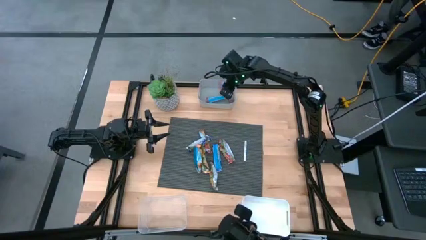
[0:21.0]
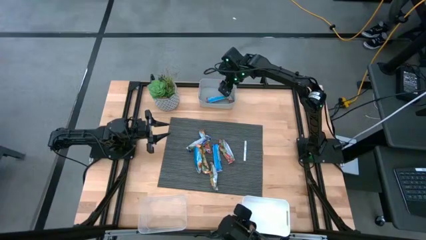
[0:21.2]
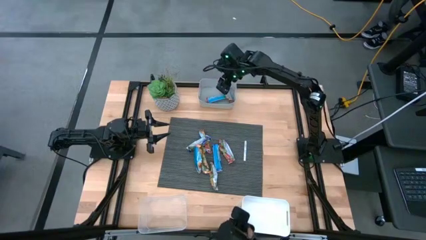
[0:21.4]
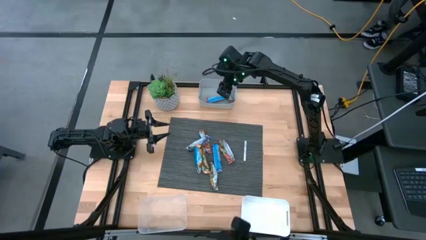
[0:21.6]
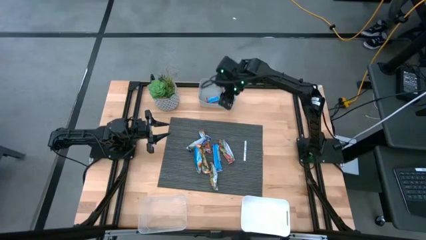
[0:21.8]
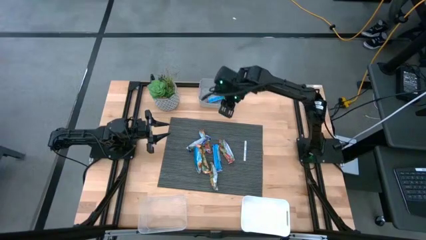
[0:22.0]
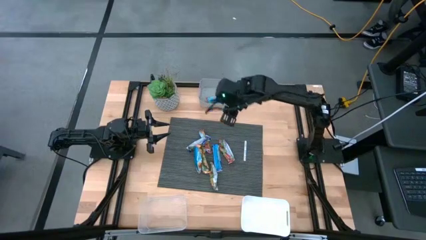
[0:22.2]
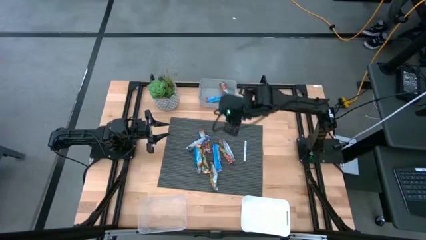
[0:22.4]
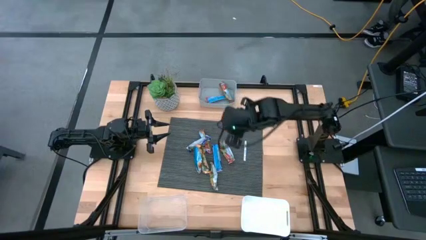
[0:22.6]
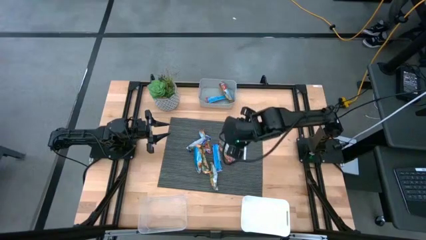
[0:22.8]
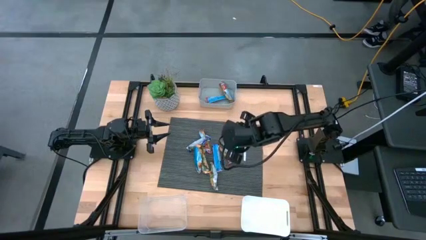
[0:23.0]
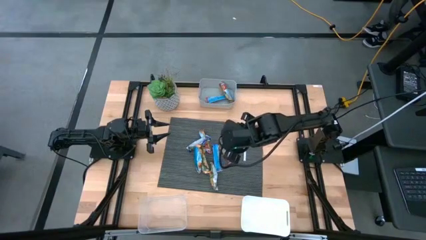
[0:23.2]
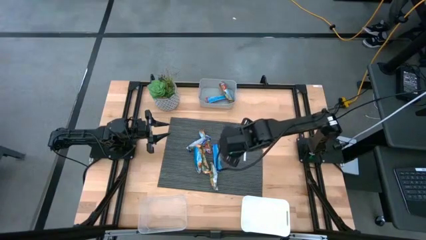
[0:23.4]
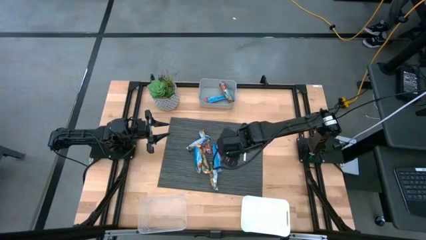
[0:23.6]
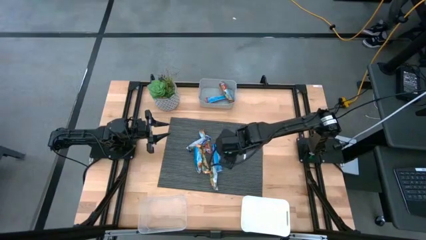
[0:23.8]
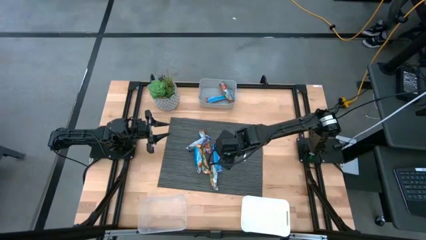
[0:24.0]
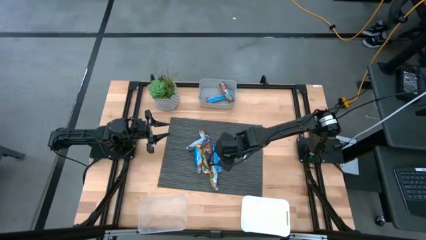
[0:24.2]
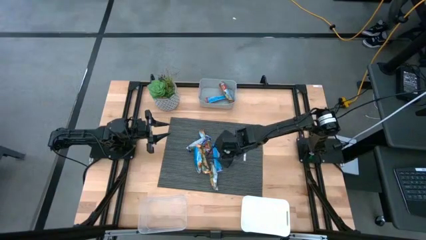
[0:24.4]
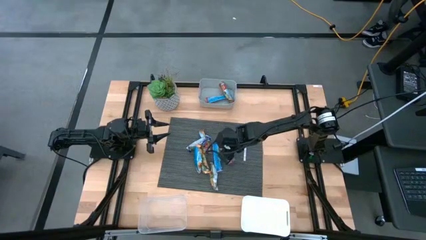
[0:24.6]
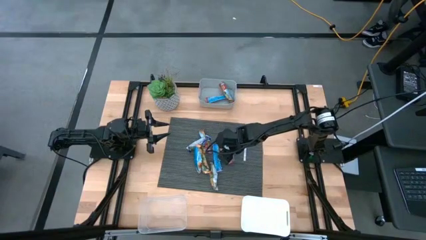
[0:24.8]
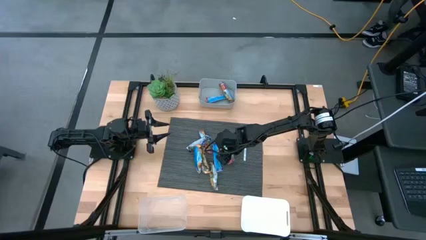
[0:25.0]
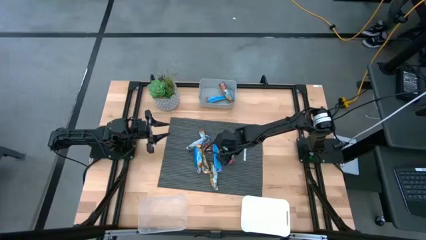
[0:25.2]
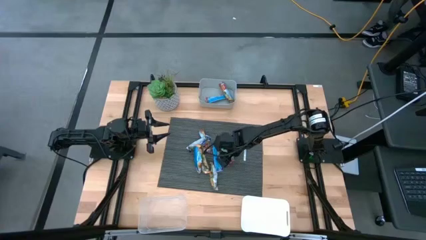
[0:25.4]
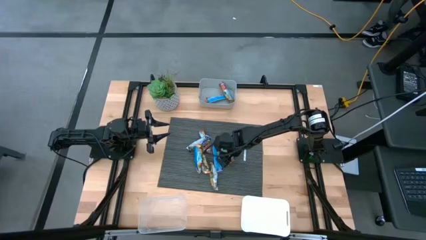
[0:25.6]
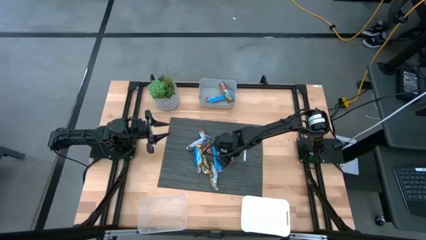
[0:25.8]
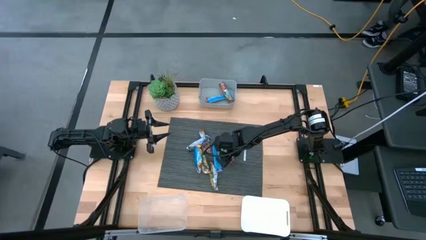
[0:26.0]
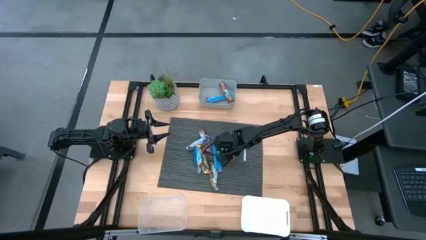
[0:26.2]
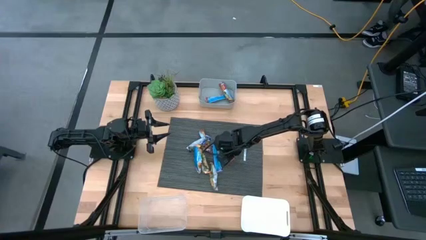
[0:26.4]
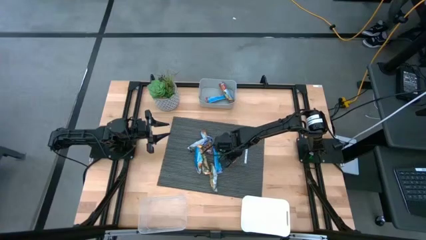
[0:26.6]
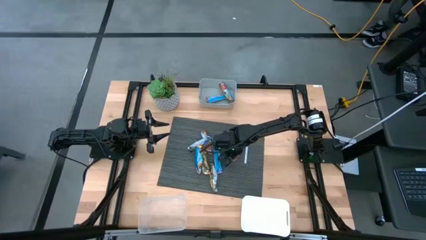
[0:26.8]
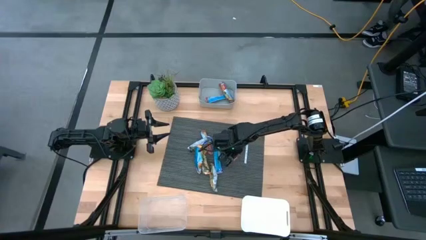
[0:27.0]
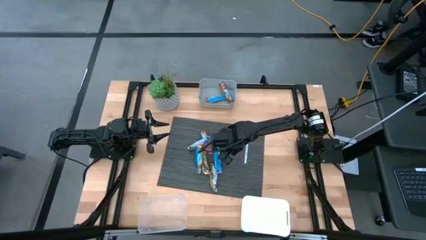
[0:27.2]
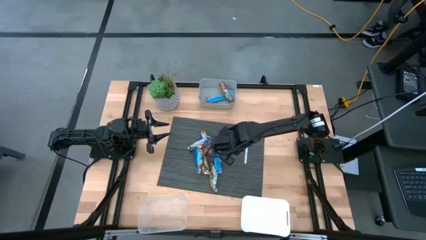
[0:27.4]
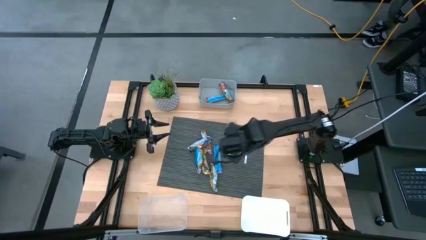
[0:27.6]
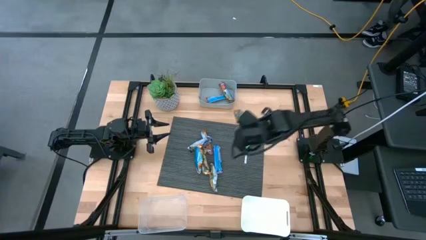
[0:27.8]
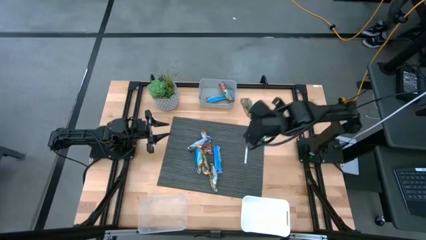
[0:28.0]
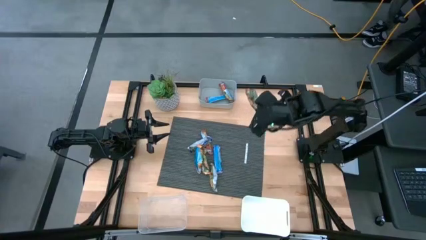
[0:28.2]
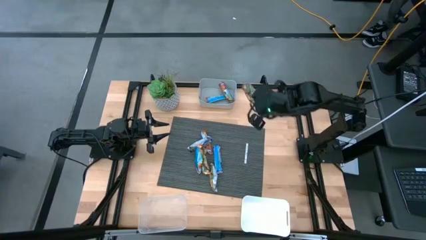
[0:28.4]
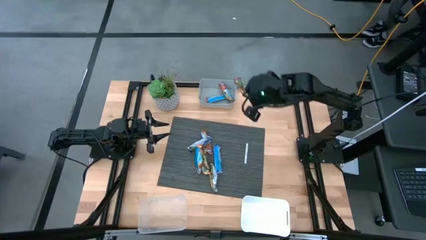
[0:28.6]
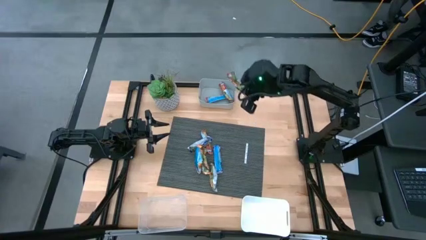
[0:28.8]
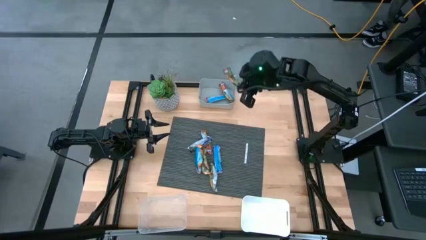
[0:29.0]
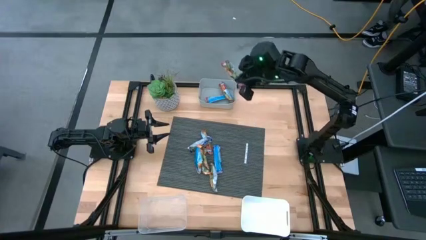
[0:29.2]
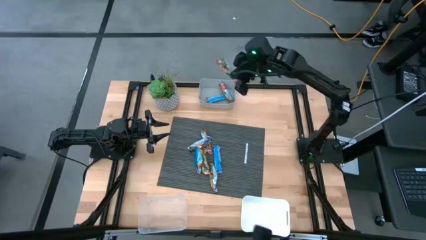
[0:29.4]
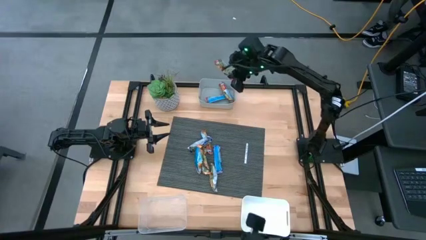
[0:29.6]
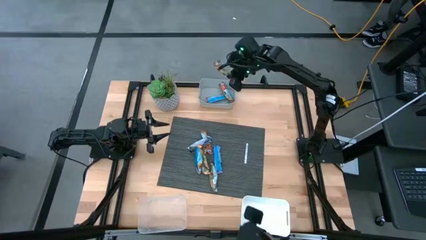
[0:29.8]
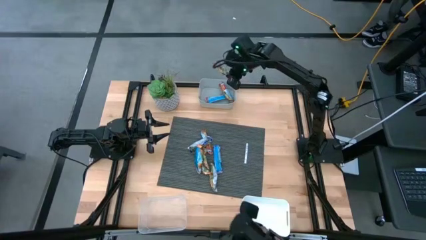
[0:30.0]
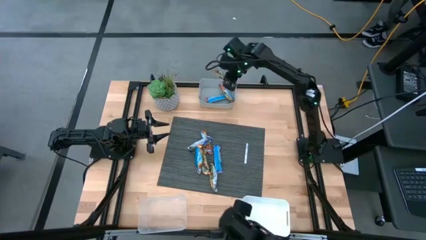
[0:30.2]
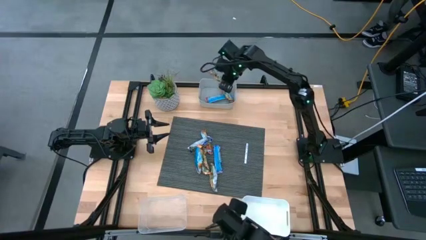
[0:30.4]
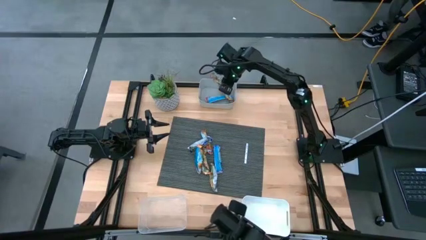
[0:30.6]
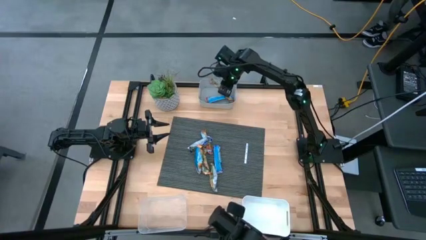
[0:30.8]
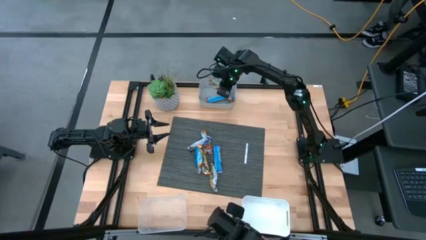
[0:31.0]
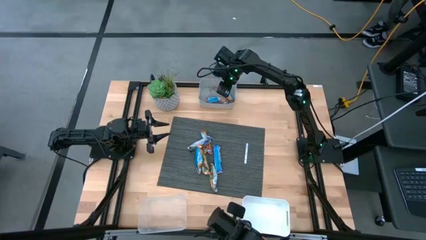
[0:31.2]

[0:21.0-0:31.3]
Task: Pick and place Granola Bars by type
Put the red granola bar into the gray bin

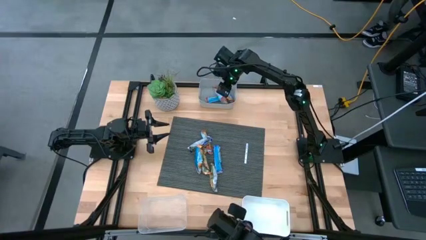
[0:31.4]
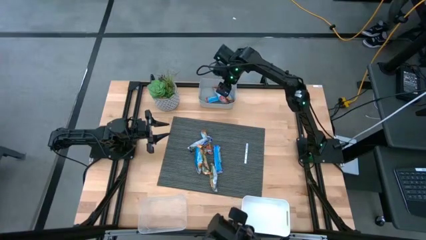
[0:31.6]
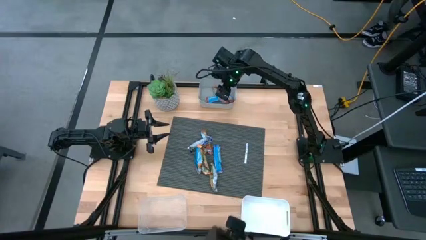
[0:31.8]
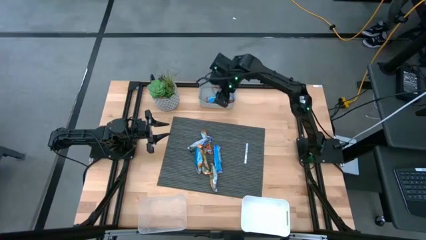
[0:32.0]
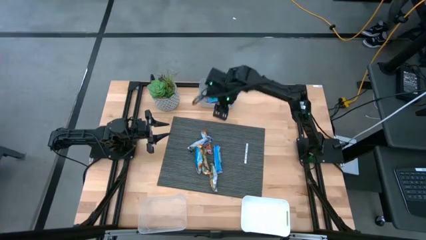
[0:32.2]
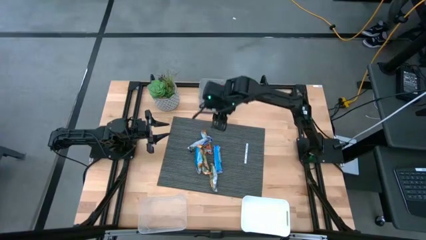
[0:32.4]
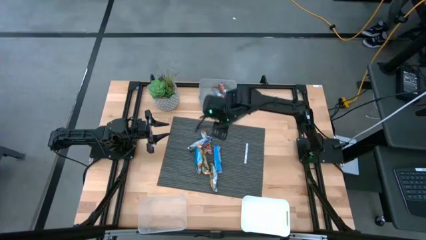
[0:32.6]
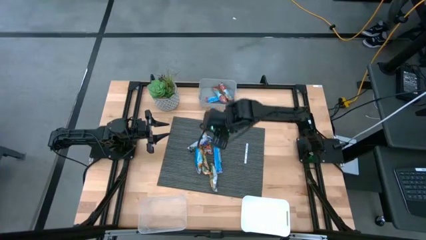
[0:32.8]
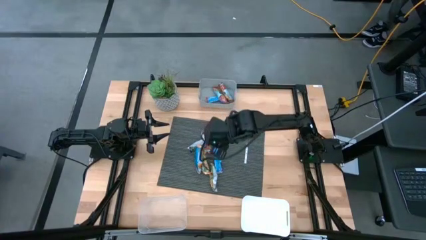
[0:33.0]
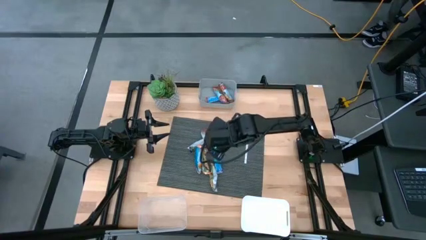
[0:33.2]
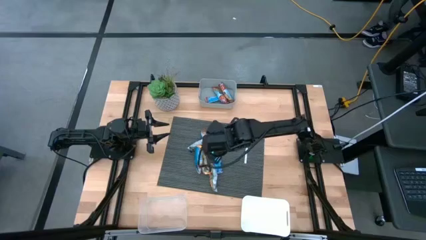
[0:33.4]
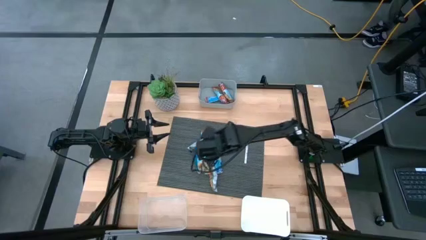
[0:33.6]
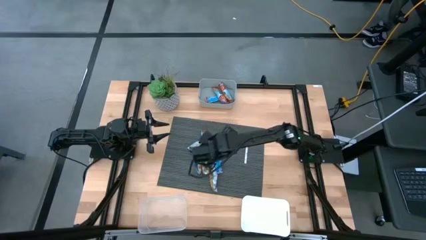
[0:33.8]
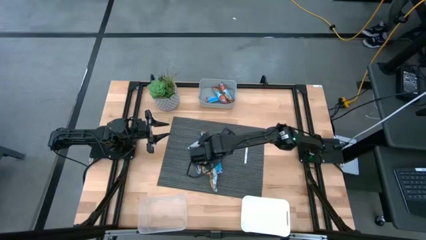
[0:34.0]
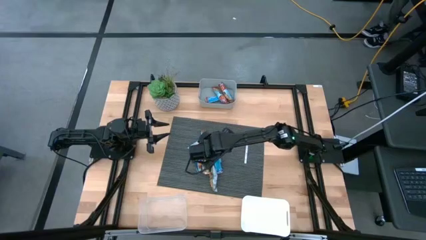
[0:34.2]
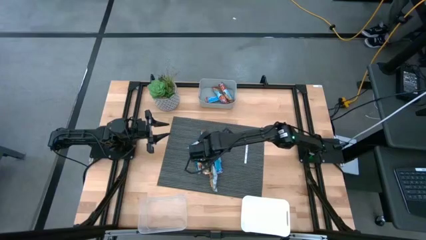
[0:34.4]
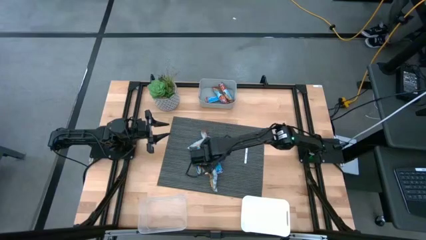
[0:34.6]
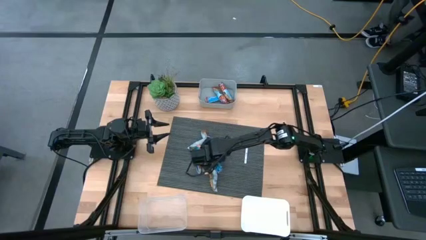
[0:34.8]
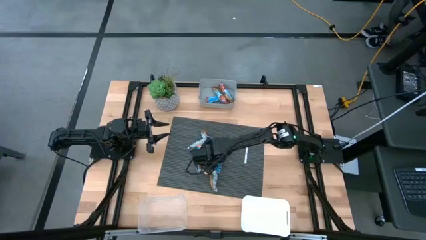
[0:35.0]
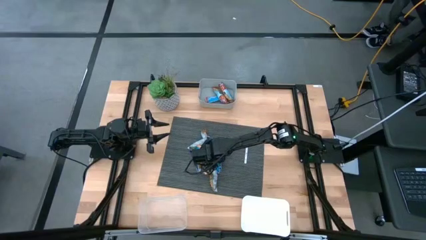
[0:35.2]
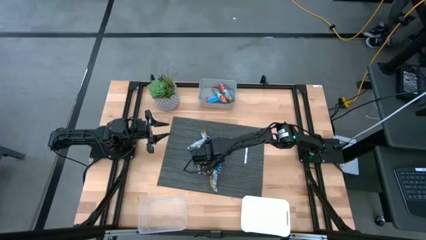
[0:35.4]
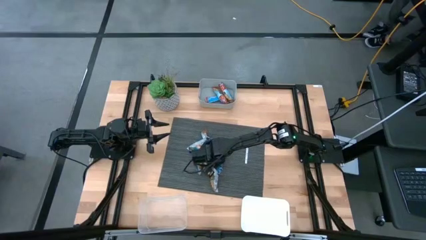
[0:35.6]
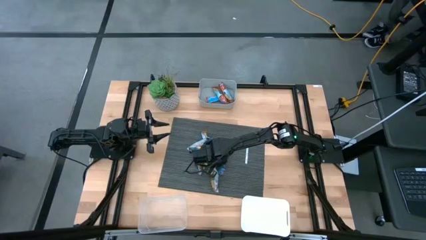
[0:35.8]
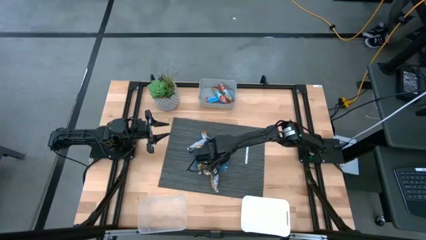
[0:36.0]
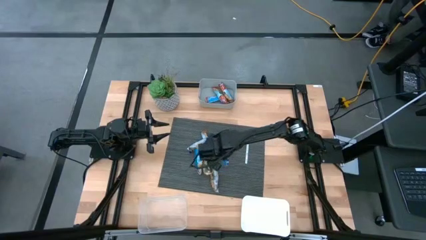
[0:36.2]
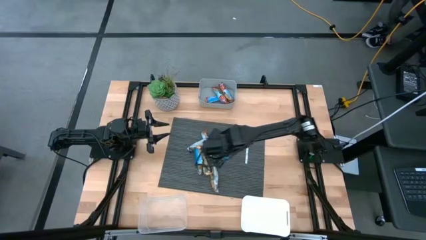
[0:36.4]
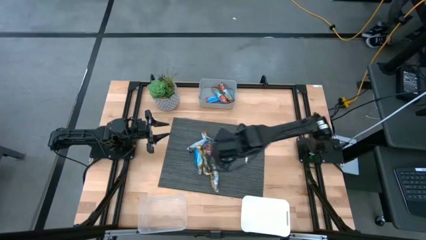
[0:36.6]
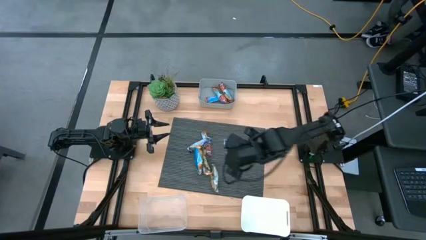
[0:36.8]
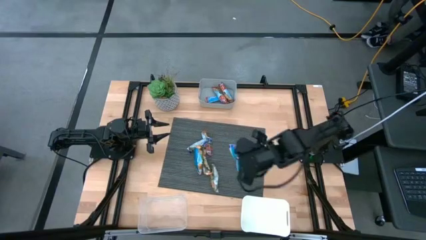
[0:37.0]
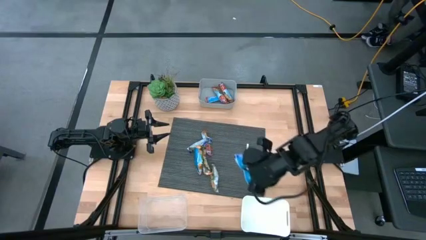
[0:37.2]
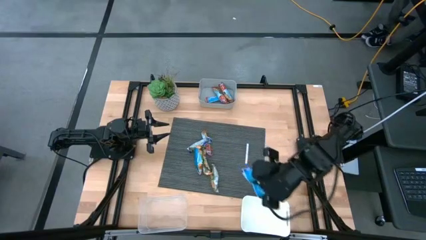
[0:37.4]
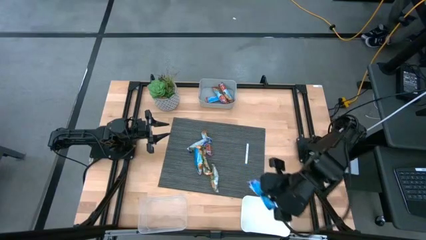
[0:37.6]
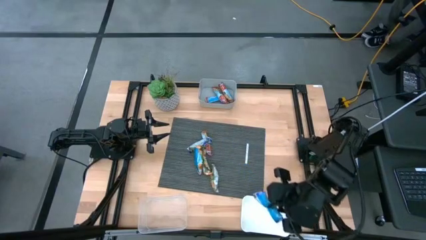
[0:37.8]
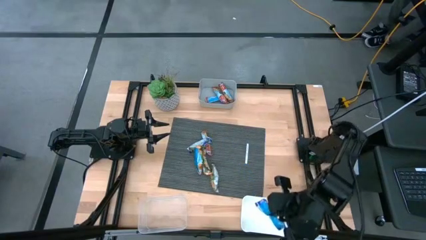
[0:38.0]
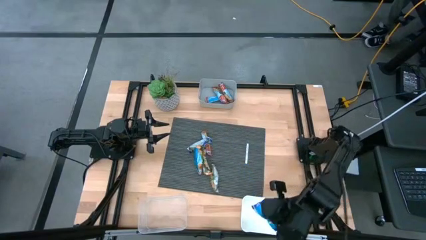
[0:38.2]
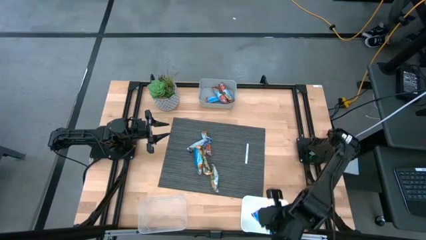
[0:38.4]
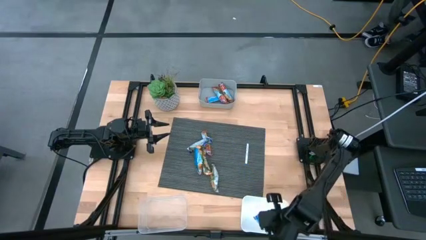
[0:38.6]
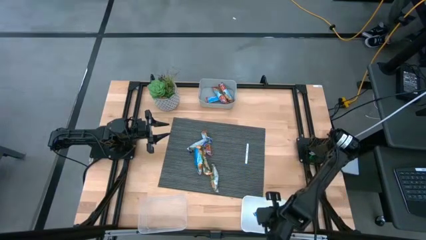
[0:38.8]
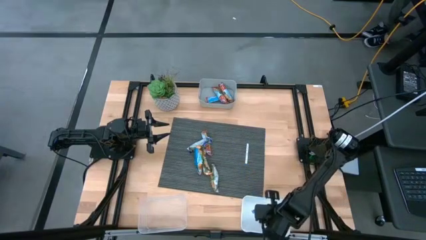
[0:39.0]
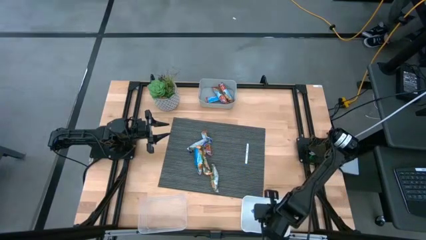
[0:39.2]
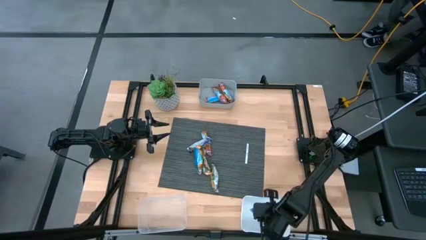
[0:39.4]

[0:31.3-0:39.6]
Put the blue granola bar into the white bin
